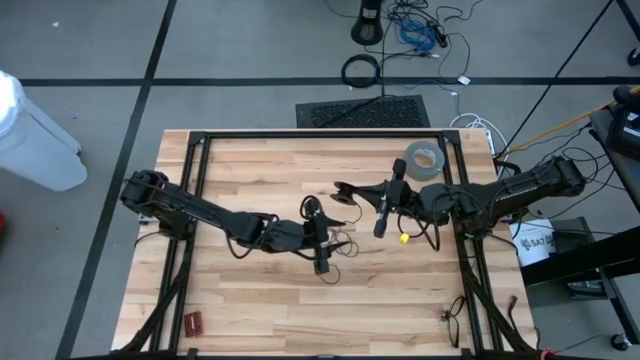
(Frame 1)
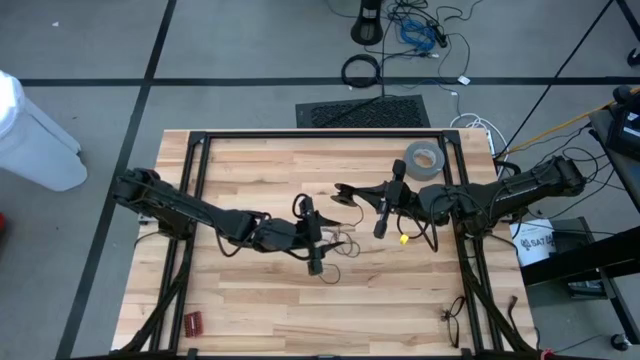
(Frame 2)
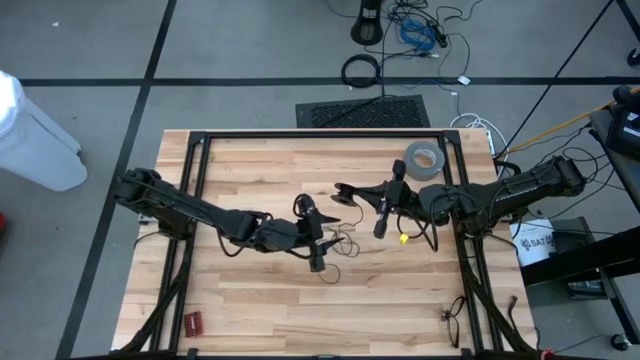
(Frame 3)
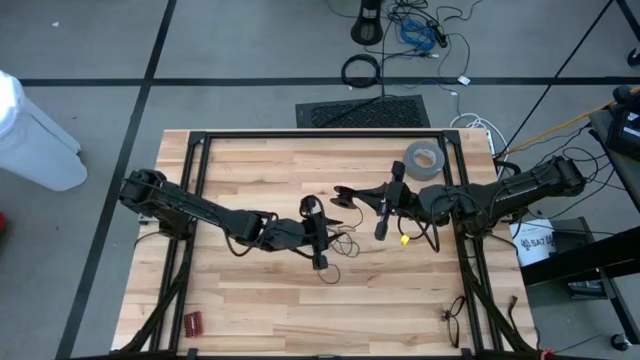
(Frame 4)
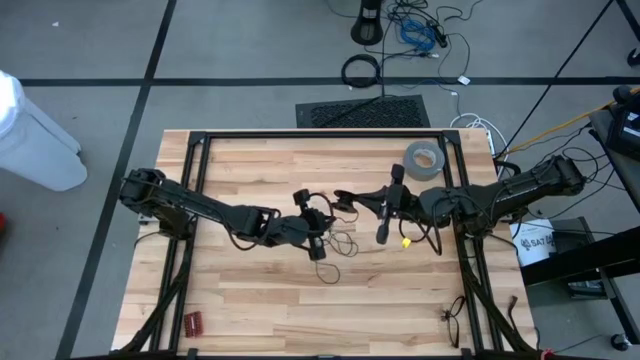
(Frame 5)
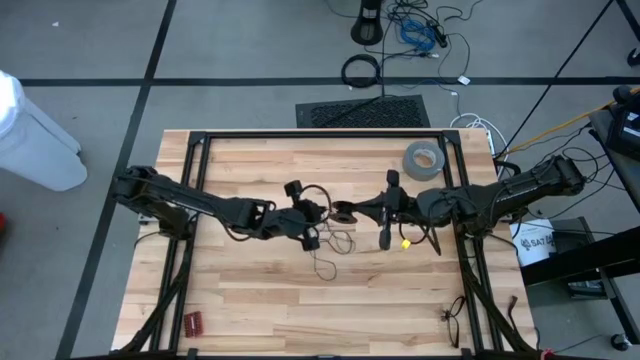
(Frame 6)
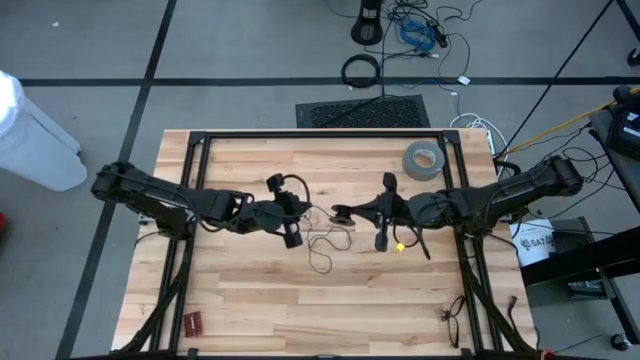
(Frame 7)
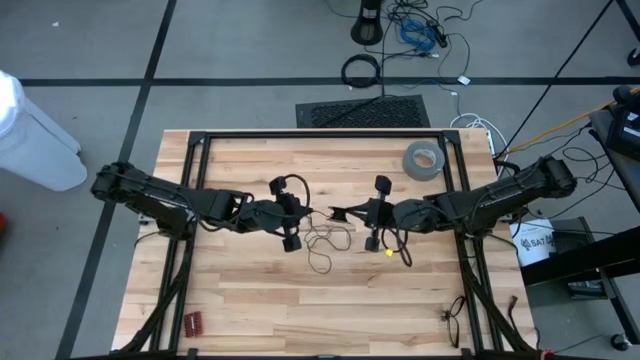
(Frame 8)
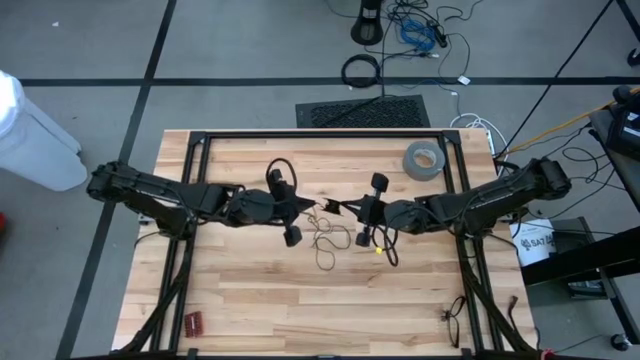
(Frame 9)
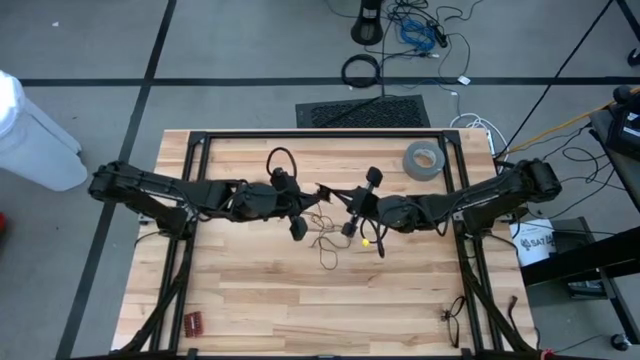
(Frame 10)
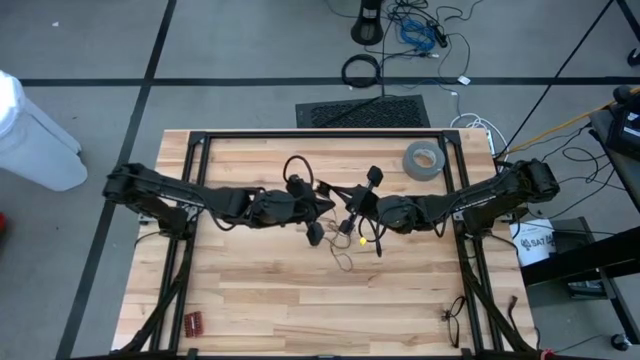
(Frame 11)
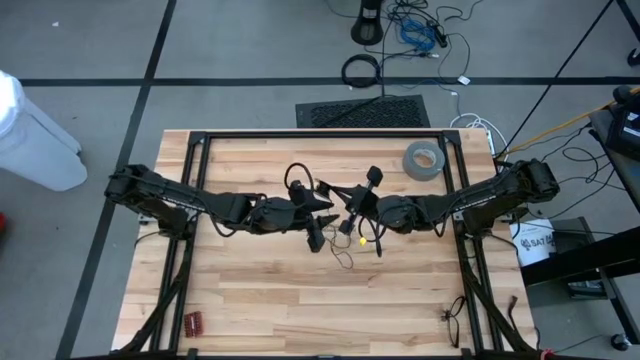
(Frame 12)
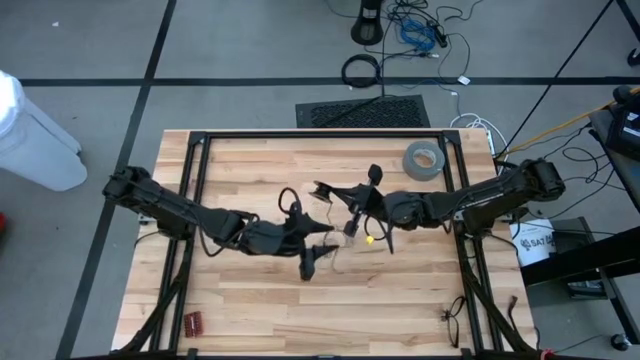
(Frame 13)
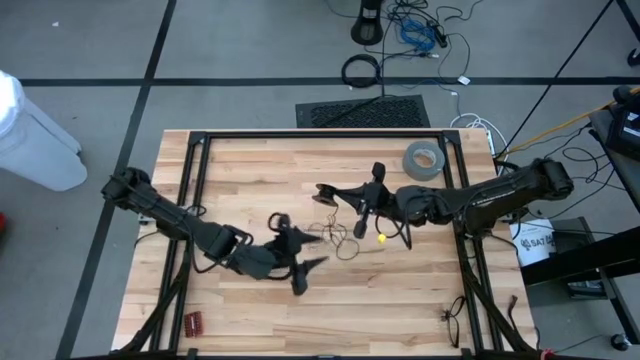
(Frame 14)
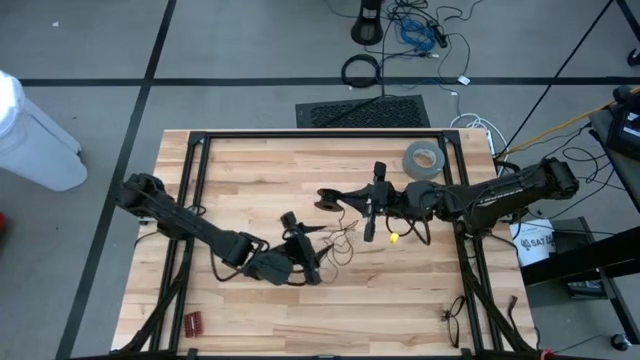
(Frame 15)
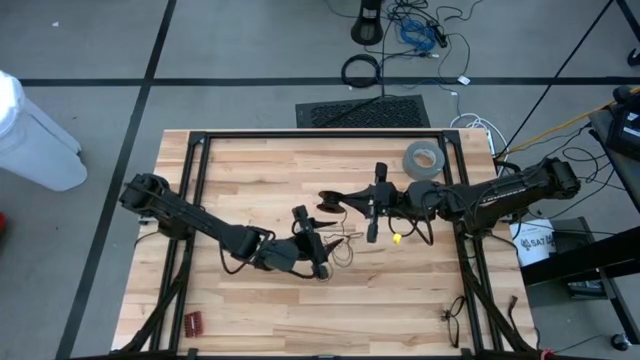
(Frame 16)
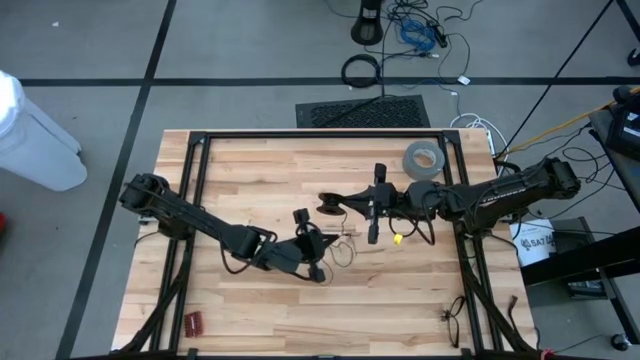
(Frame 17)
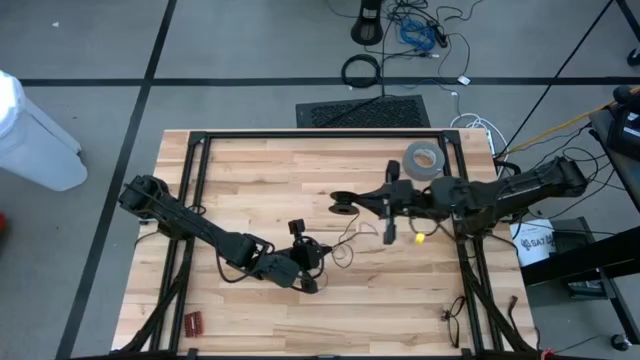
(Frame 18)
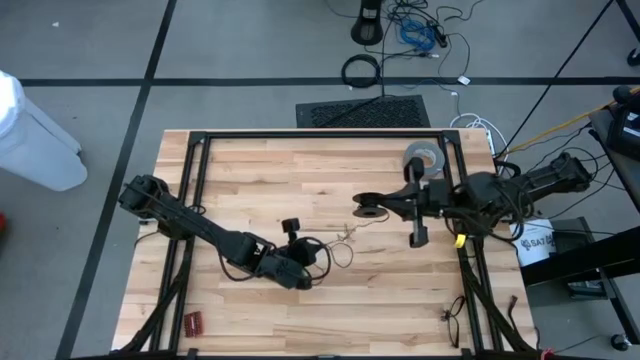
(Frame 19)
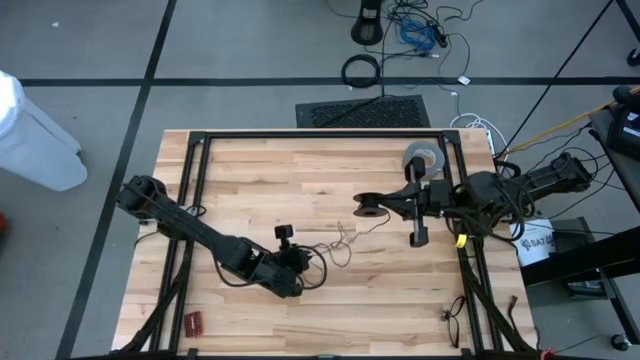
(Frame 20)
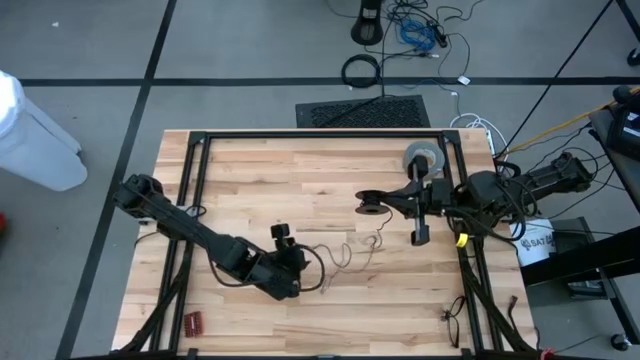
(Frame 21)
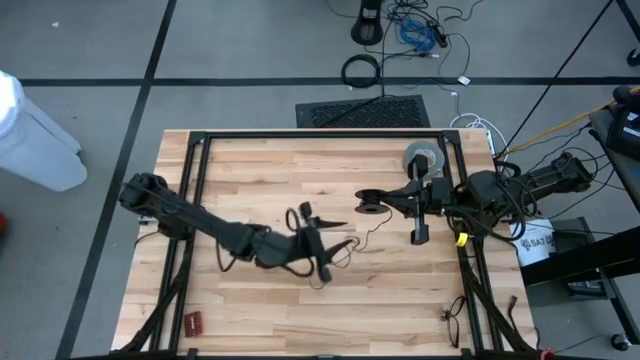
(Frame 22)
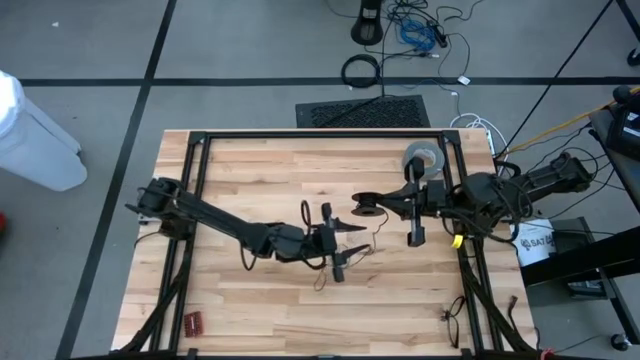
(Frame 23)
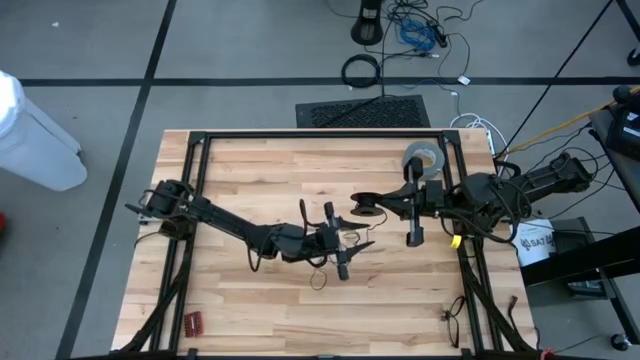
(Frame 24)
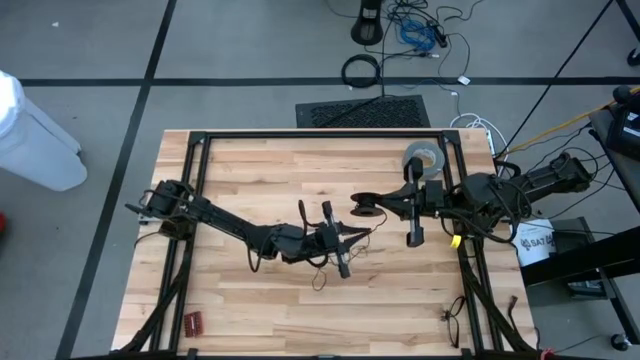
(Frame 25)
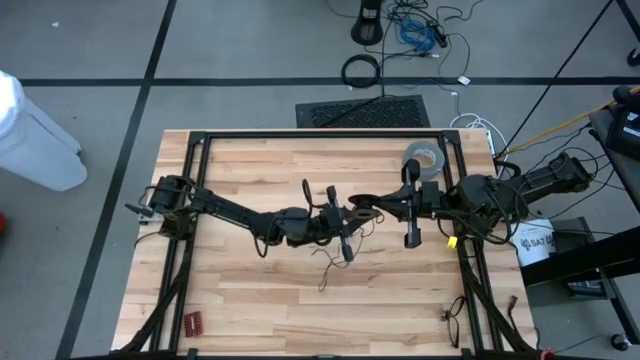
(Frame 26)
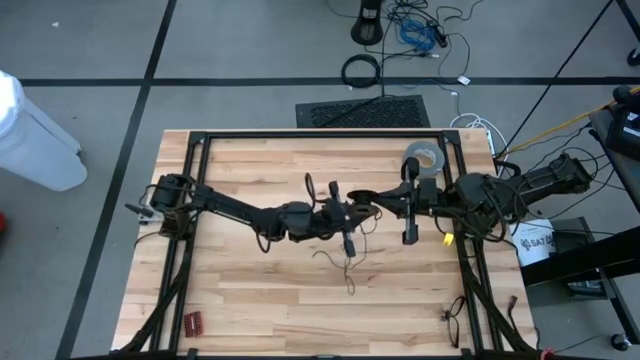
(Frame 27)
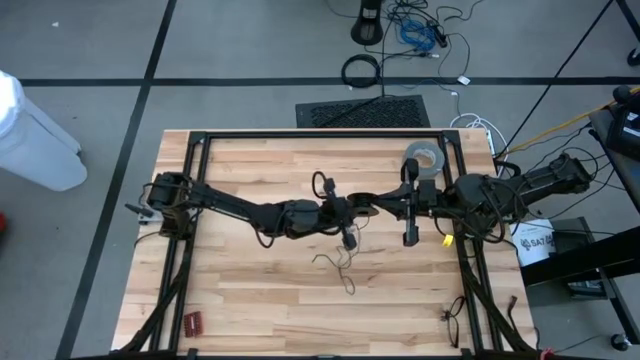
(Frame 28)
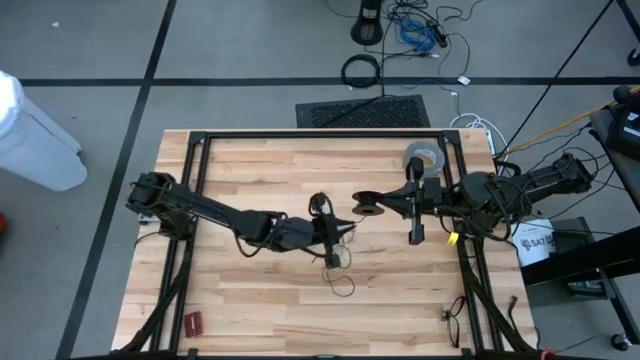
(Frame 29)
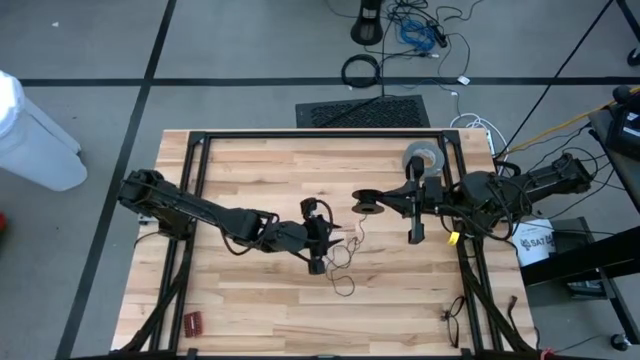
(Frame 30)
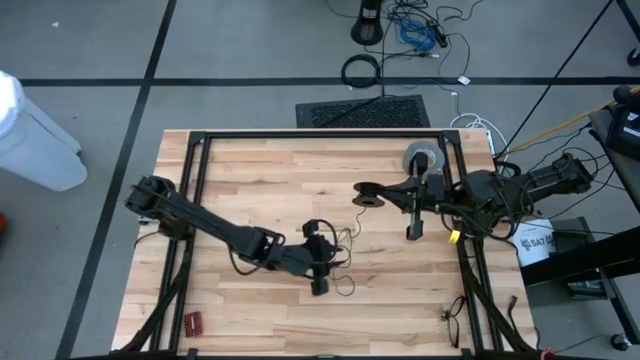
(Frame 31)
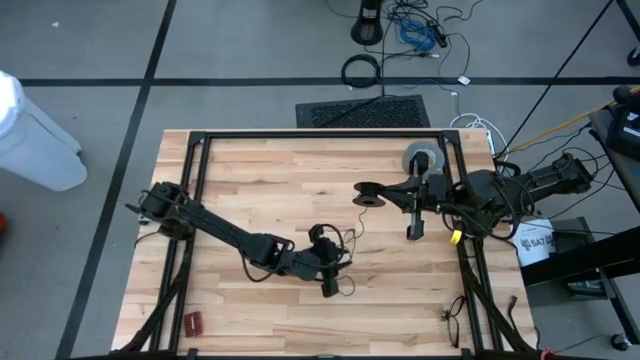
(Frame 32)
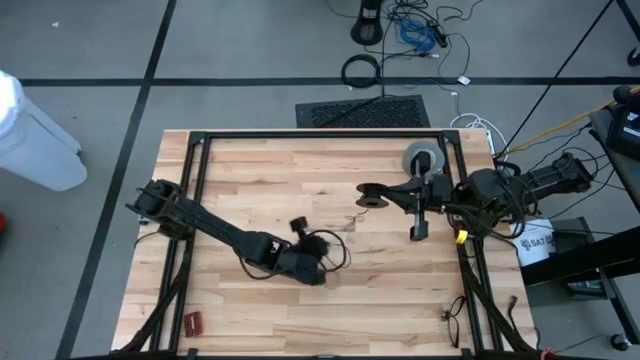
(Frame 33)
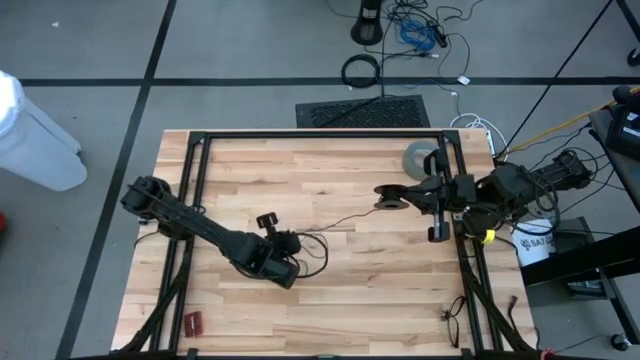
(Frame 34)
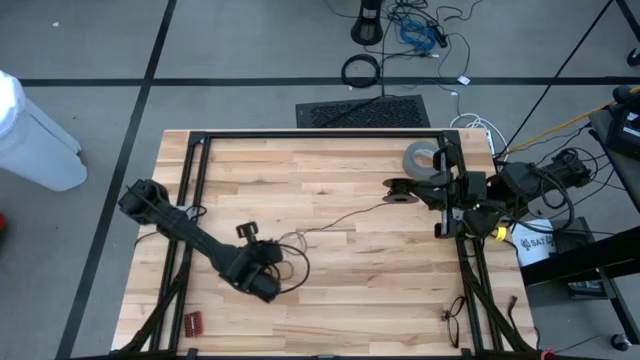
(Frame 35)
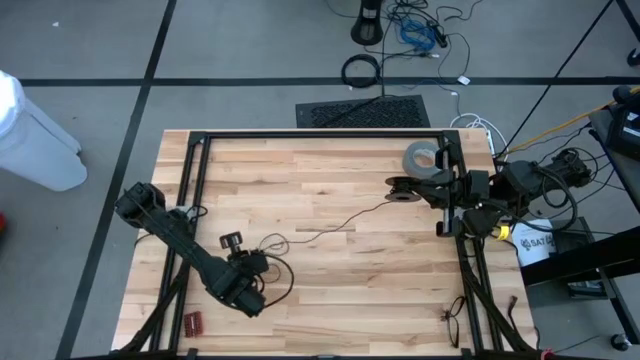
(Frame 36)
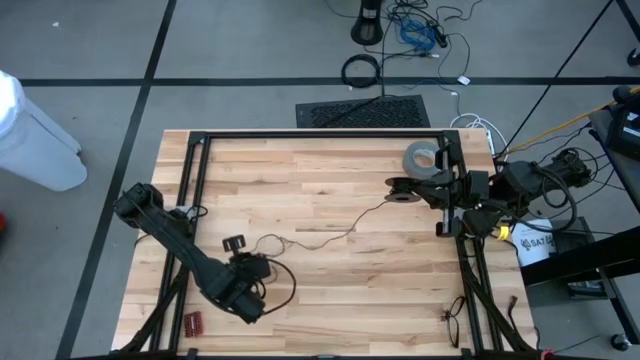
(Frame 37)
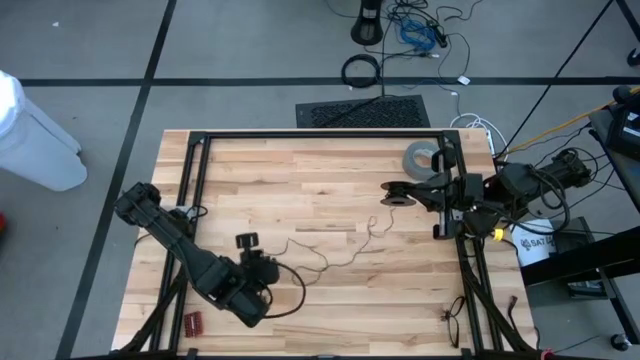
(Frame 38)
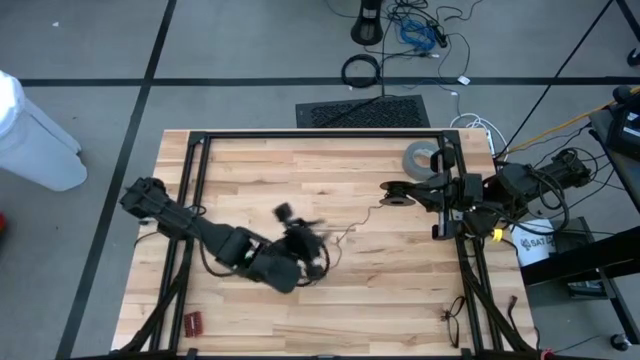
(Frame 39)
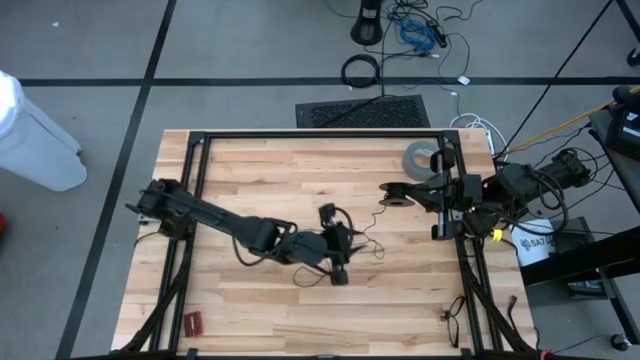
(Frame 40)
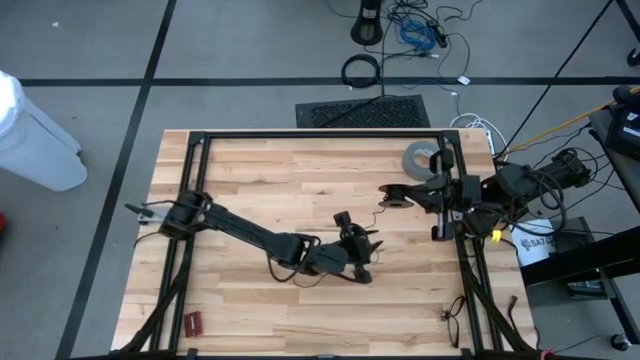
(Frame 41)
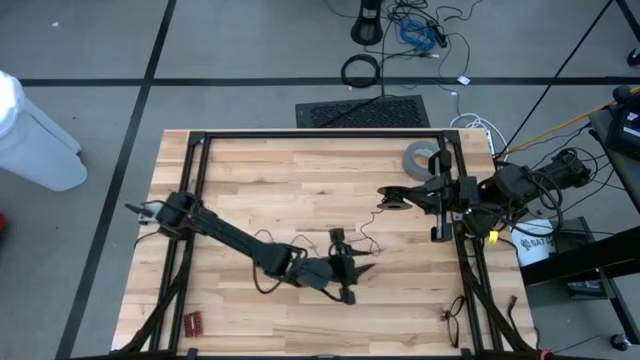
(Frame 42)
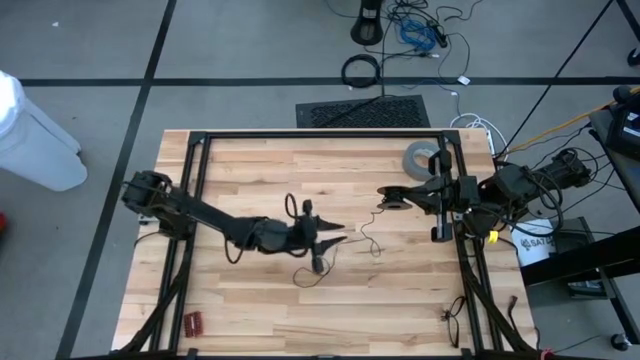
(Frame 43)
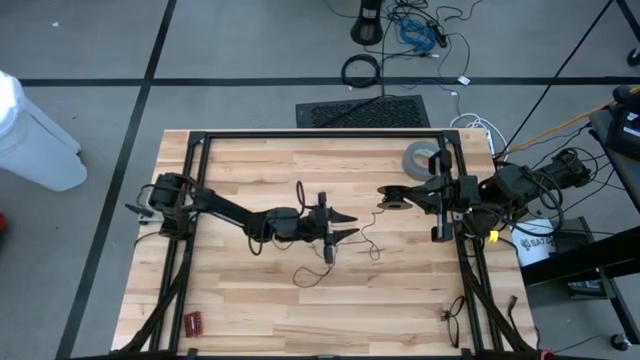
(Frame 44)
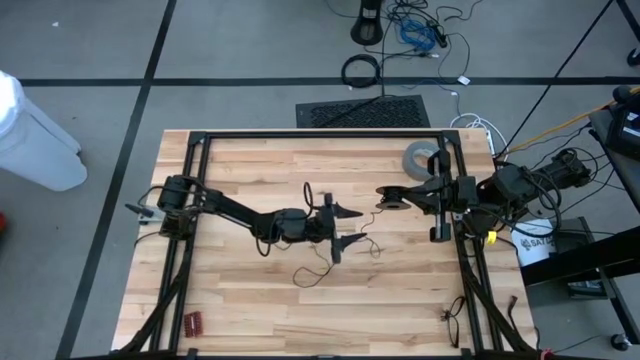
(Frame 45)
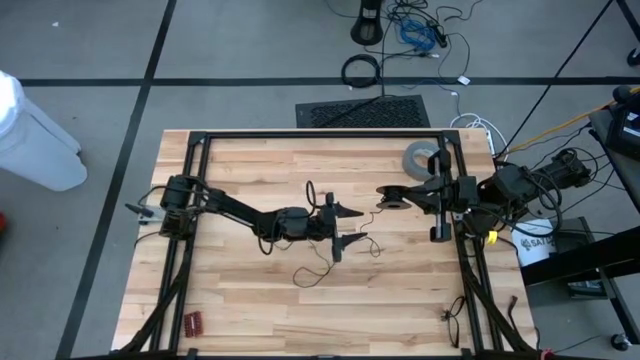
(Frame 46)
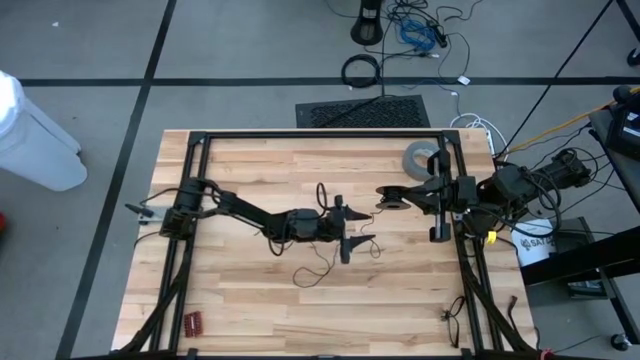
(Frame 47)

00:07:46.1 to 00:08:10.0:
Task: Coil cords
Coil the black wire onto the spool
